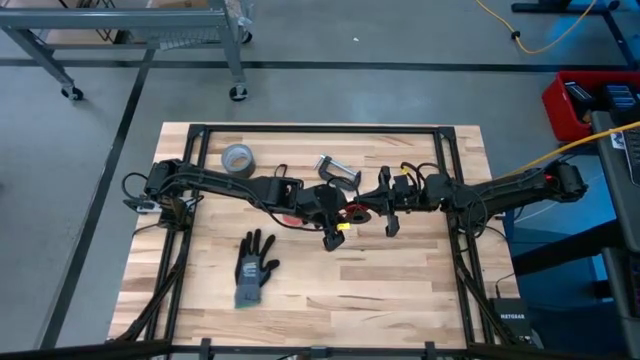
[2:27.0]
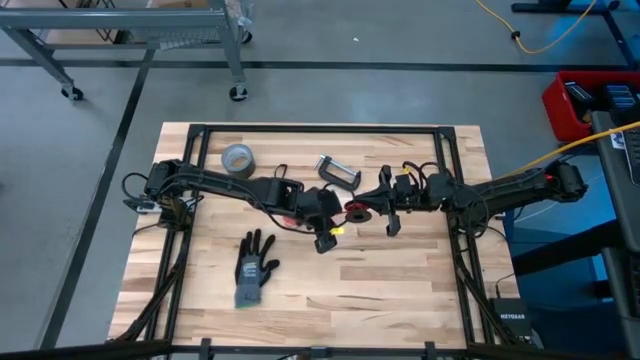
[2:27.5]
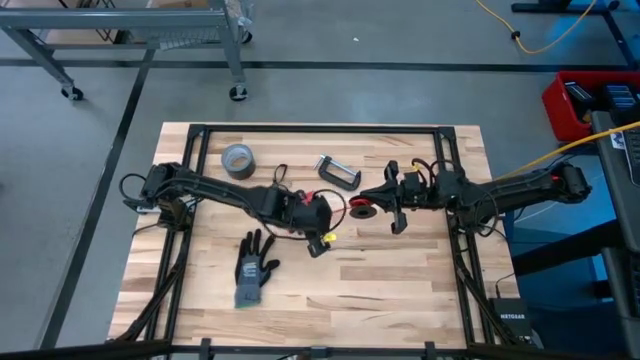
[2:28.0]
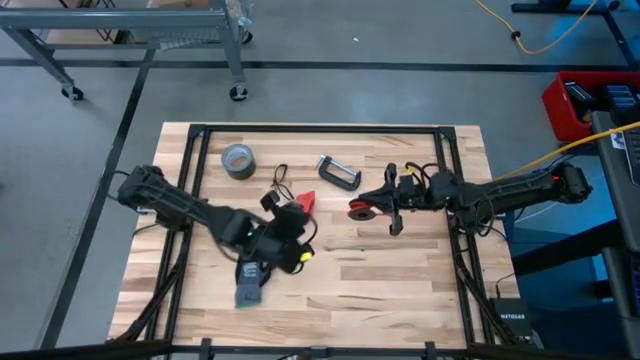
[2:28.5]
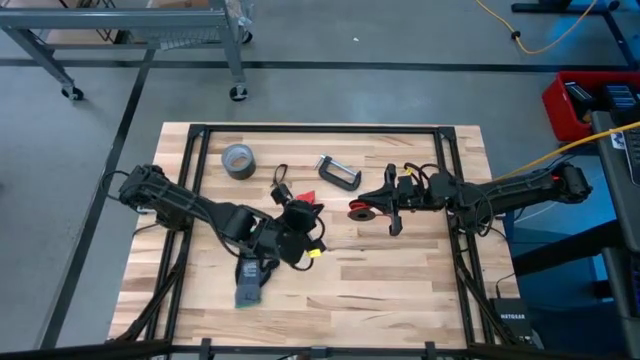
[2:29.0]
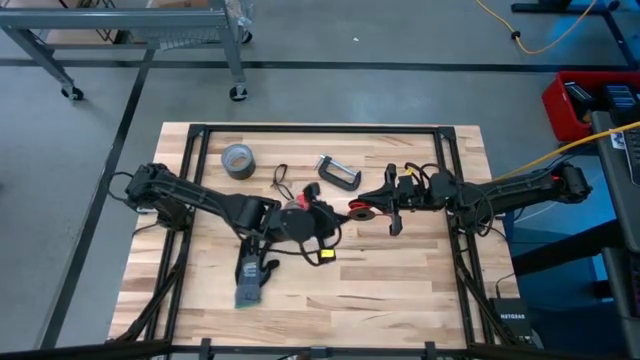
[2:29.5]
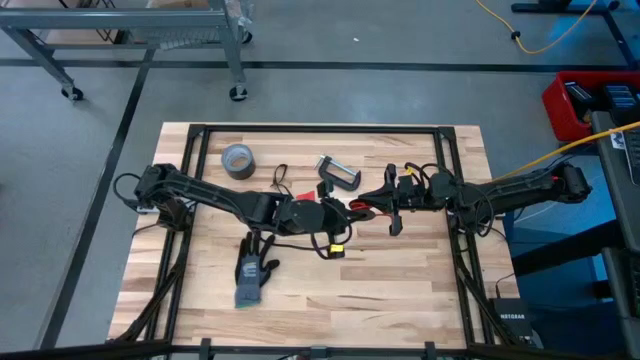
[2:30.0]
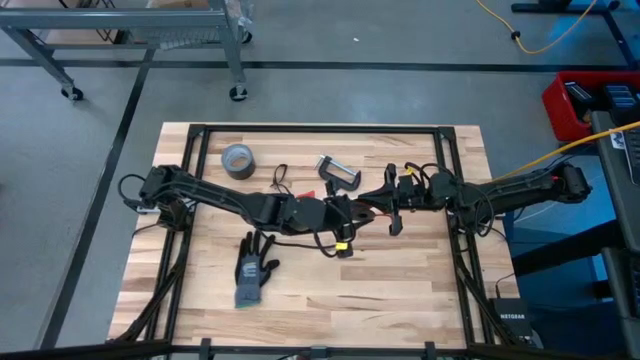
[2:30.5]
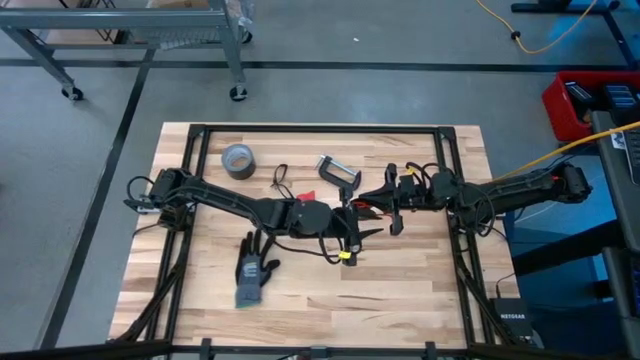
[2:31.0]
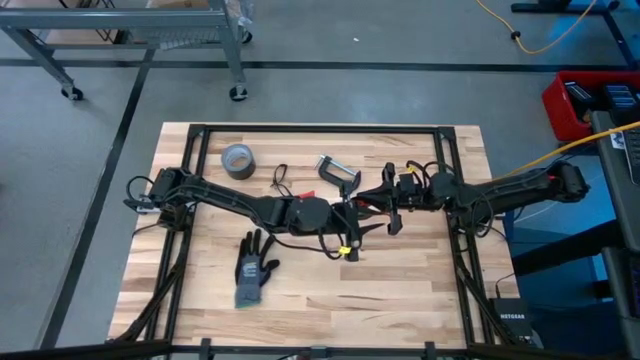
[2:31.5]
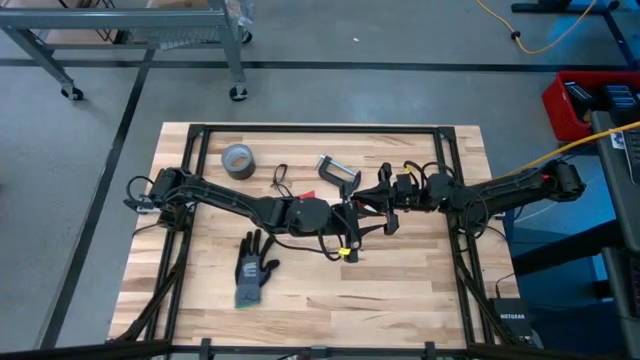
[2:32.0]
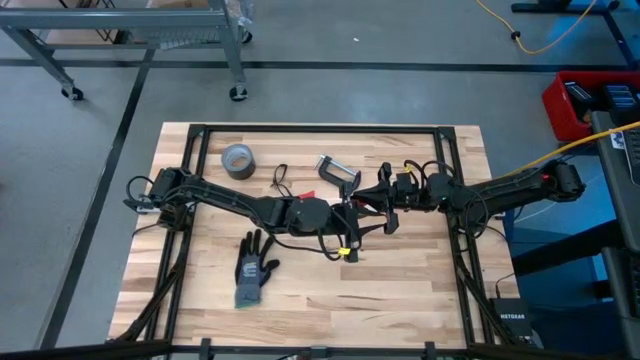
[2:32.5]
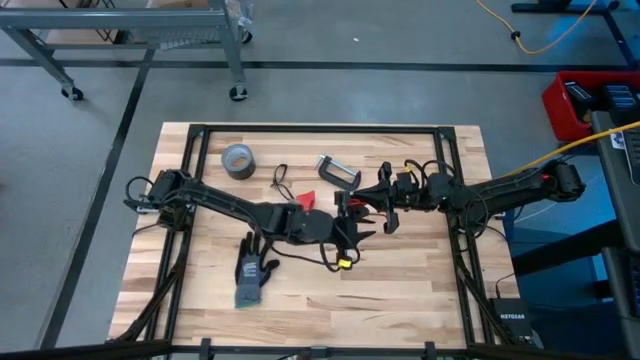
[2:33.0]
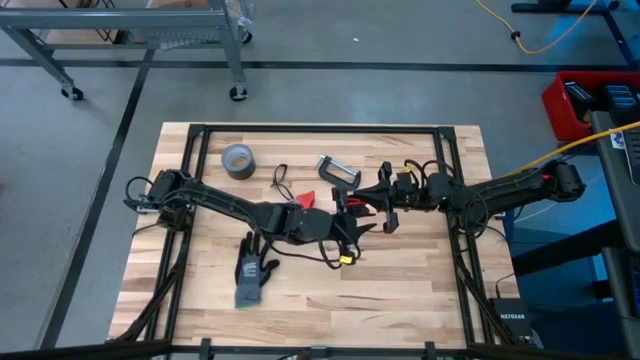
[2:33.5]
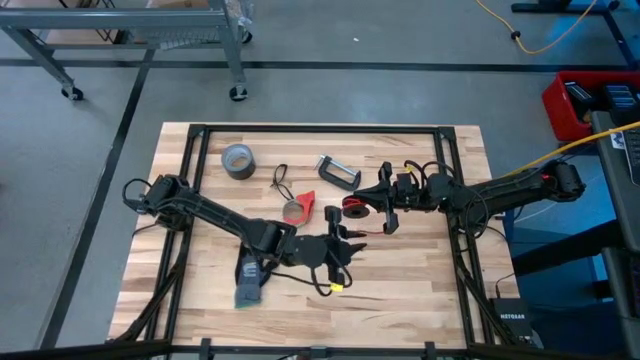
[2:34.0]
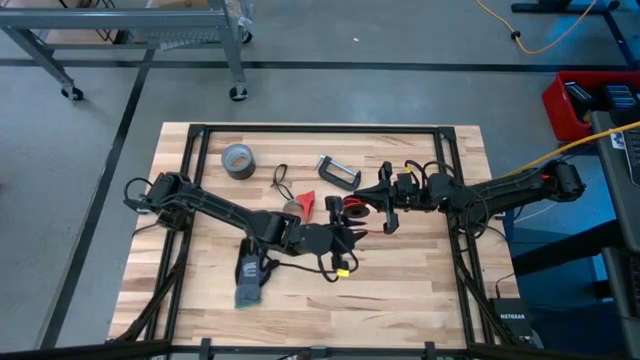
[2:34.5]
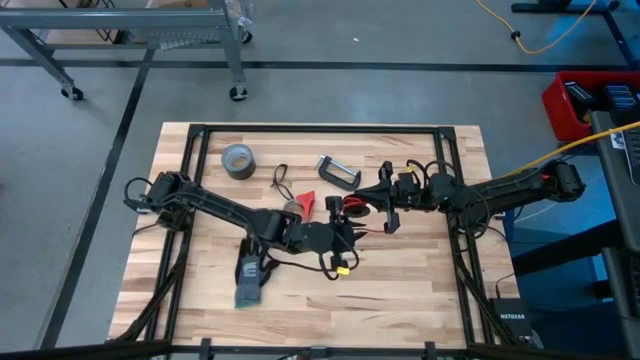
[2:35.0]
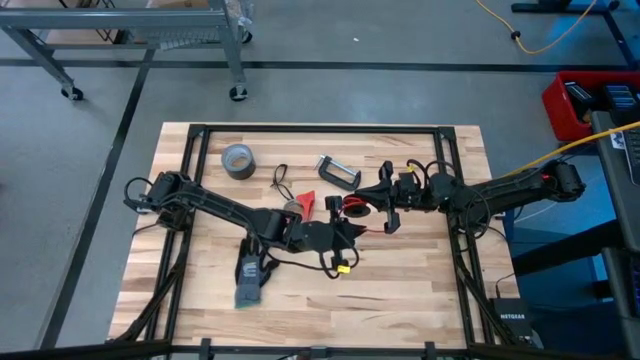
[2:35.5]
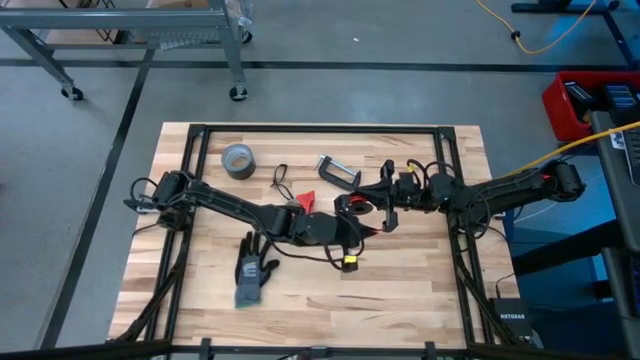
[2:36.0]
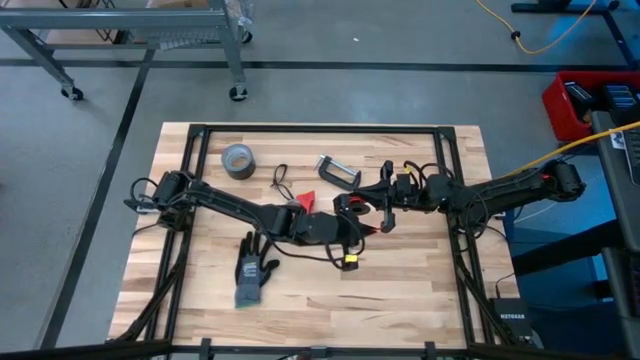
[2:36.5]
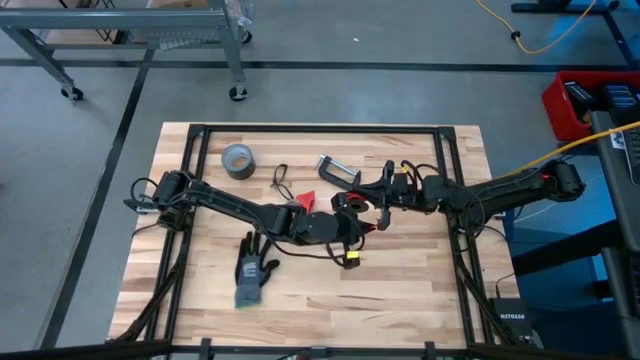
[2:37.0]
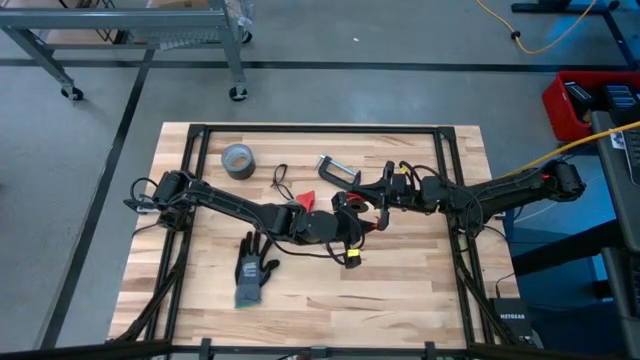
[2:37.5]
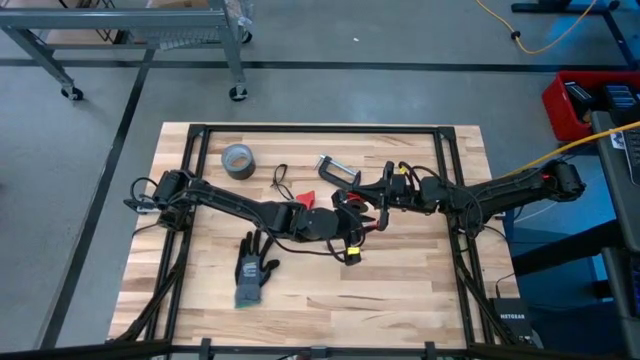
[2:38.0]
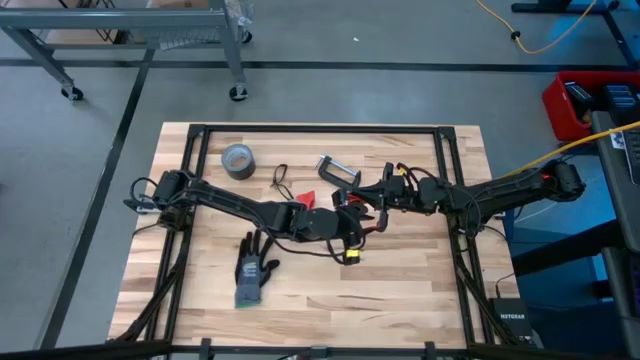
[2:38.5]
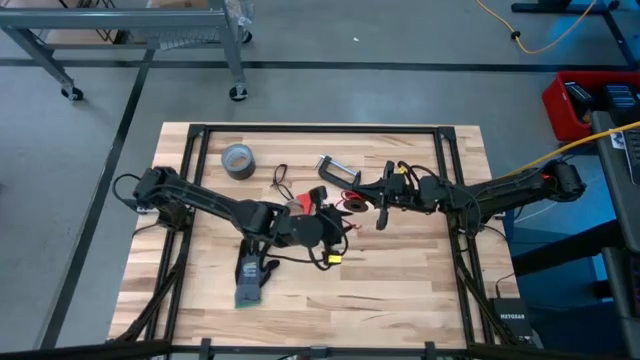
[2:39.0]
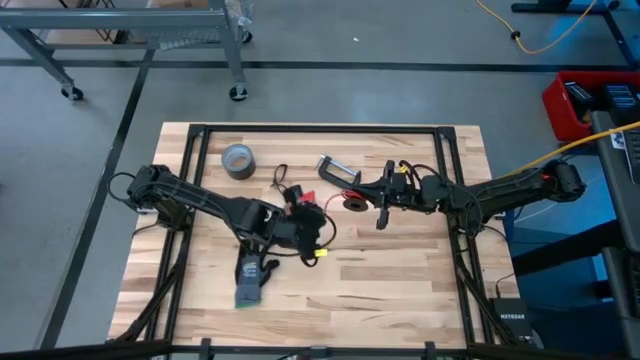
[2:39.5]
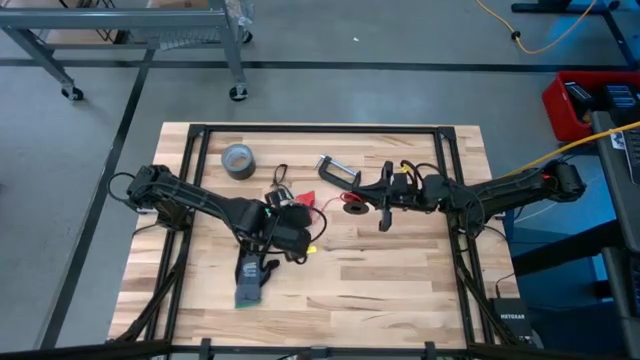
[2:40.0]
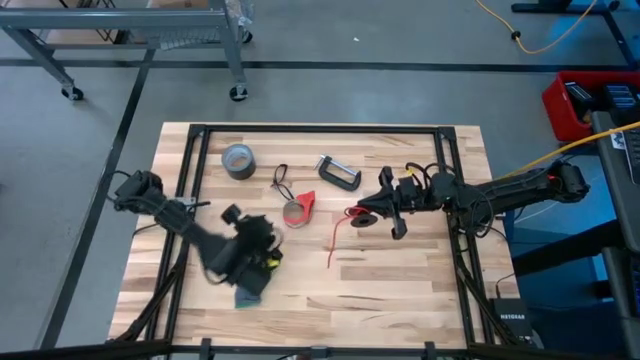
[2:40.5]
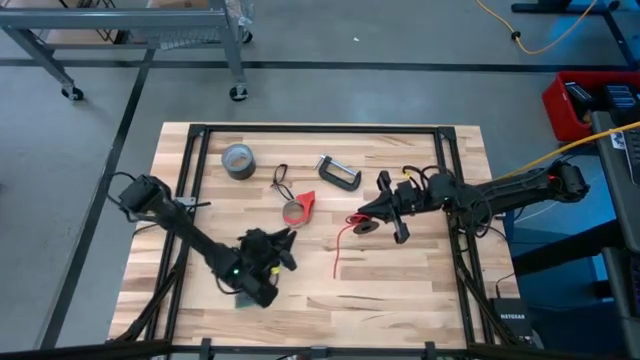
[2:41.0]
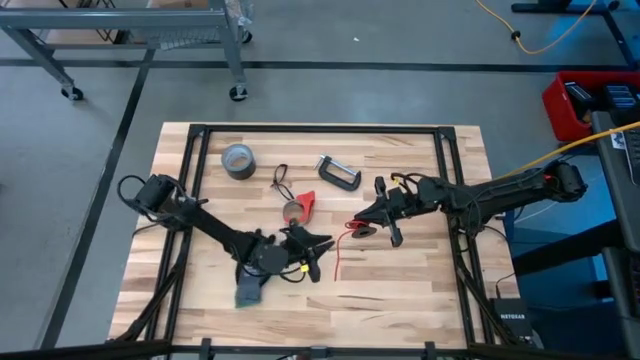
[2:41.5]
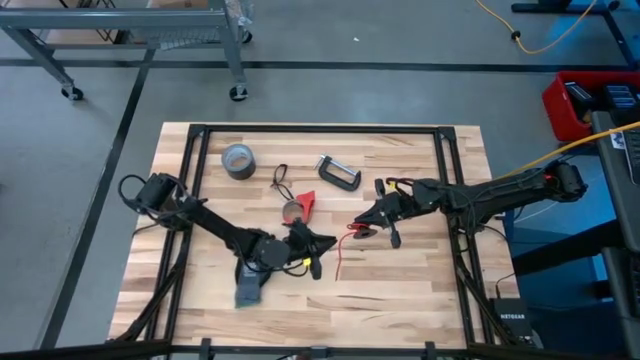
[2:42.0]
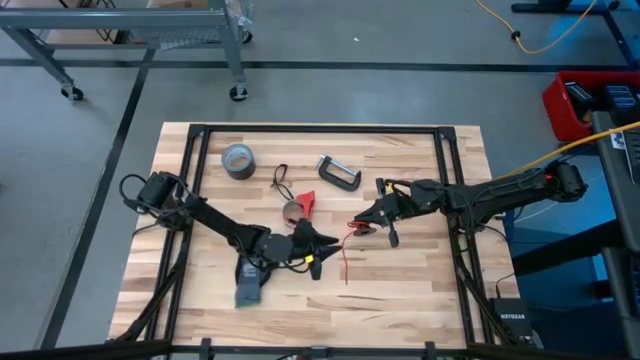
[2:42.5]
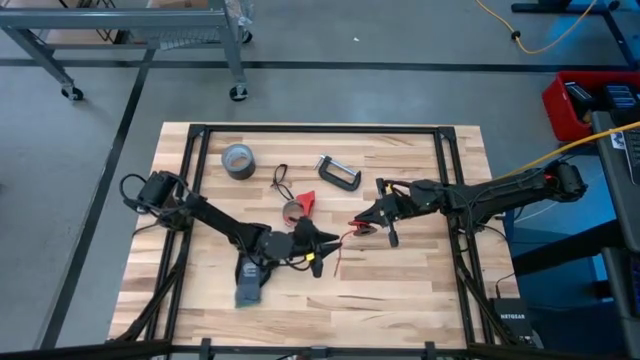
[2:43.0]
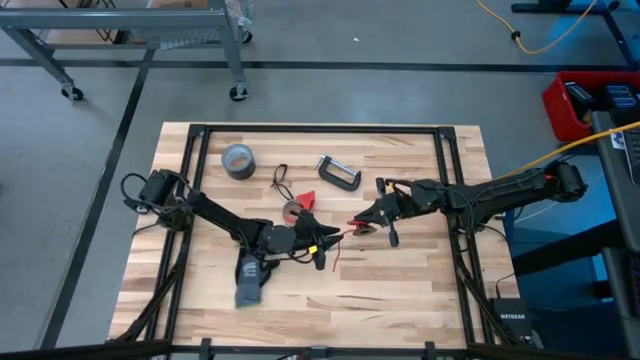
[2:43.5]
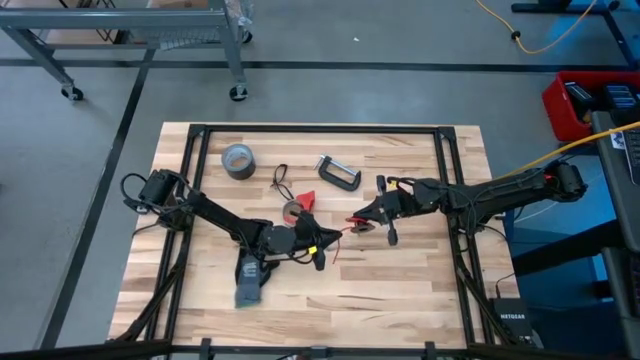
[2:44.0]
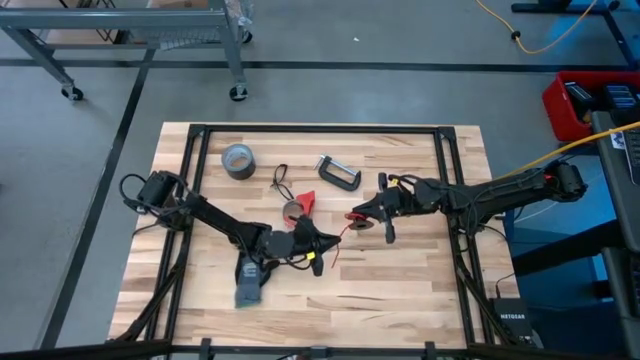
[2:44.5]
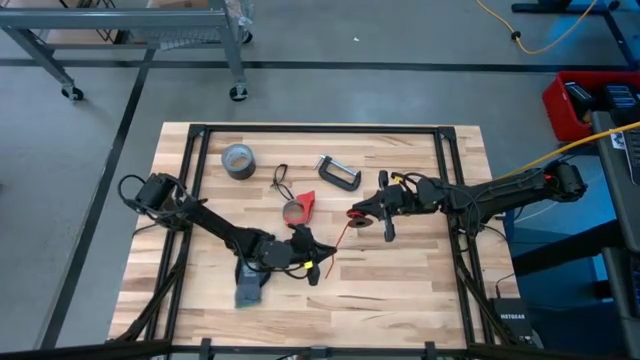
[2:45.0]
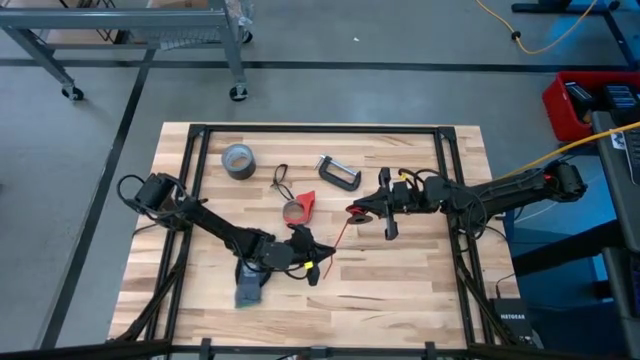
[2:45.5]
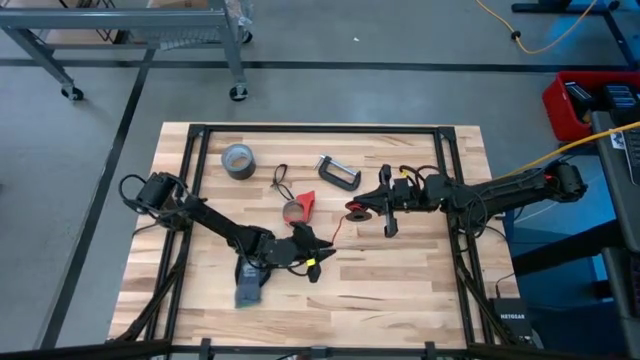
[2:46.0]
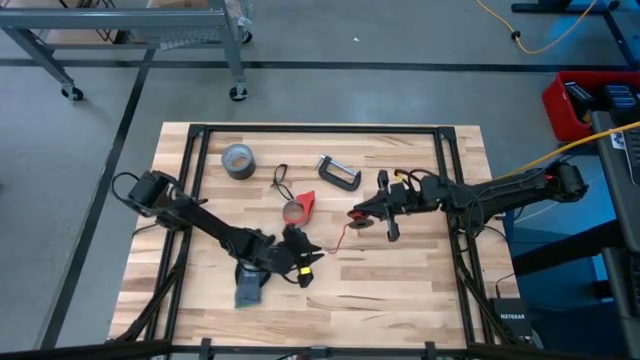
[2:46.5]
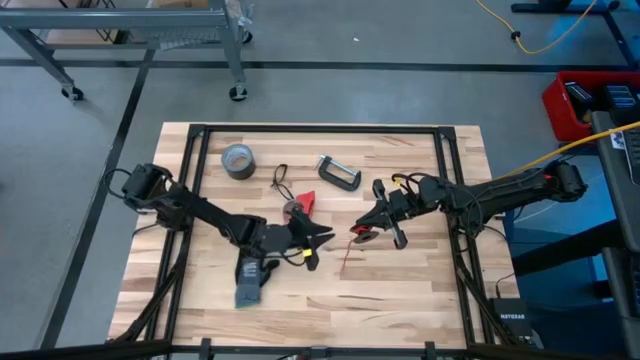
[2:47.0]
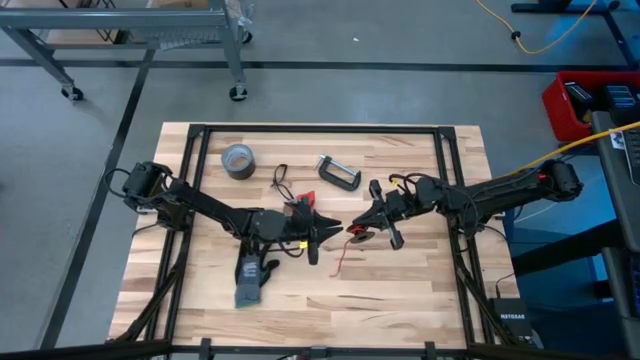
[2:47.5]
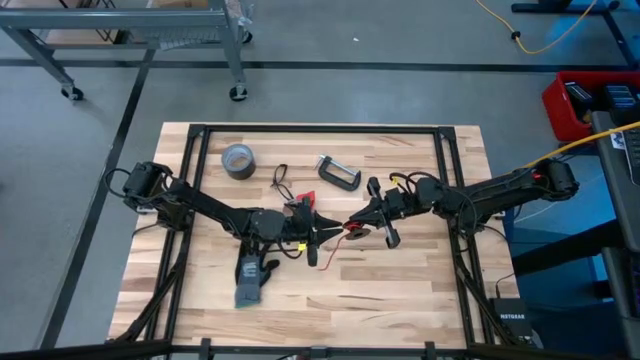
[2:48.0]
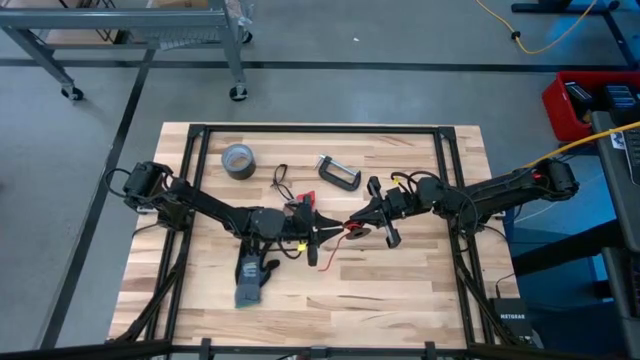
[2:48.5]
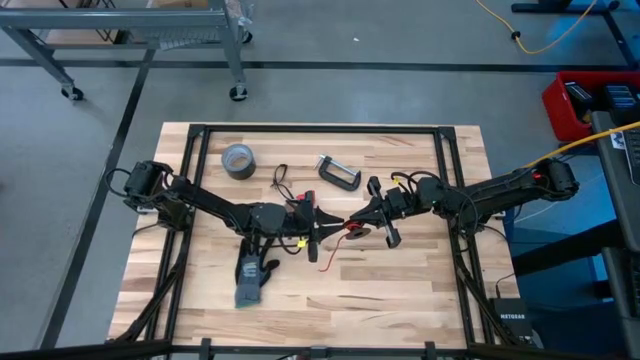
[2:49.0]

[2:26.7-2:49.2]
Task: Coil cords
Coil the red wire onto the spool
